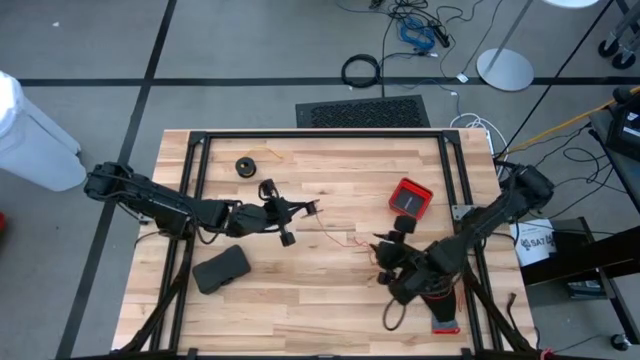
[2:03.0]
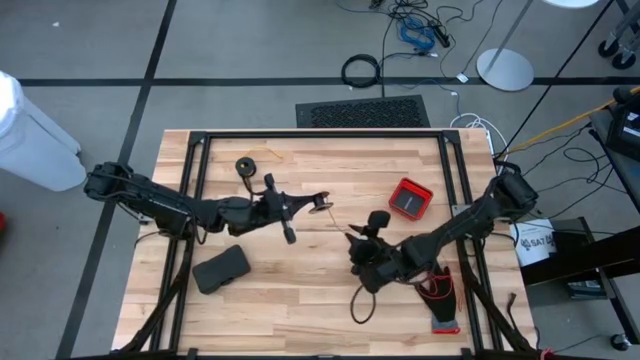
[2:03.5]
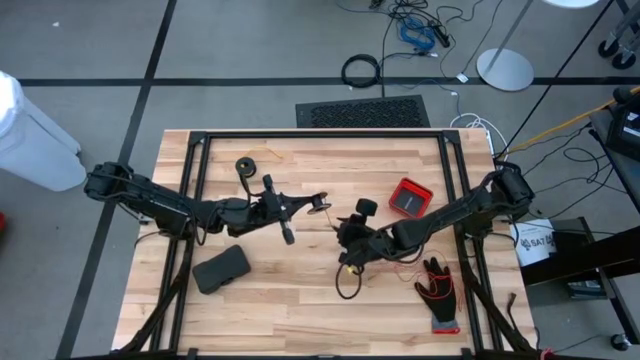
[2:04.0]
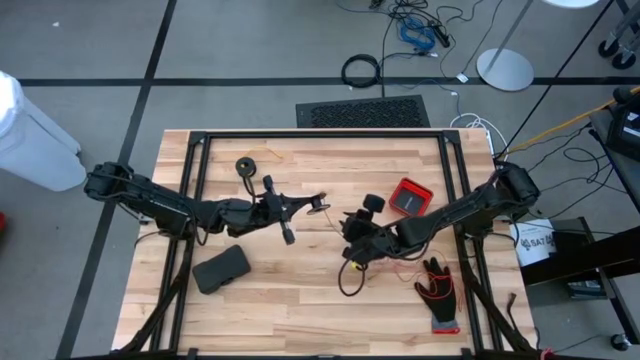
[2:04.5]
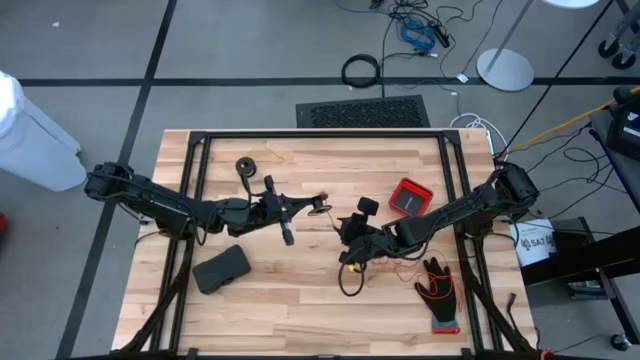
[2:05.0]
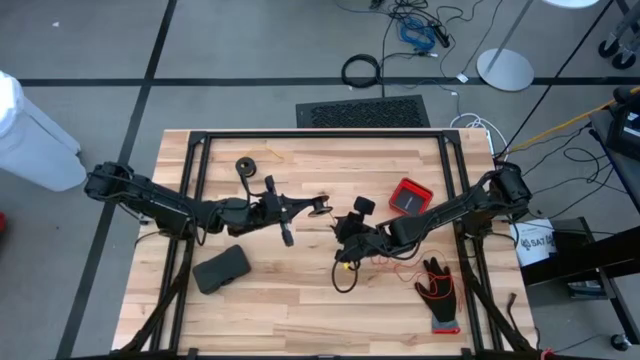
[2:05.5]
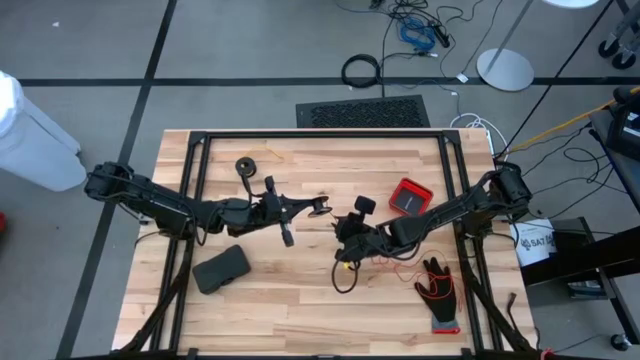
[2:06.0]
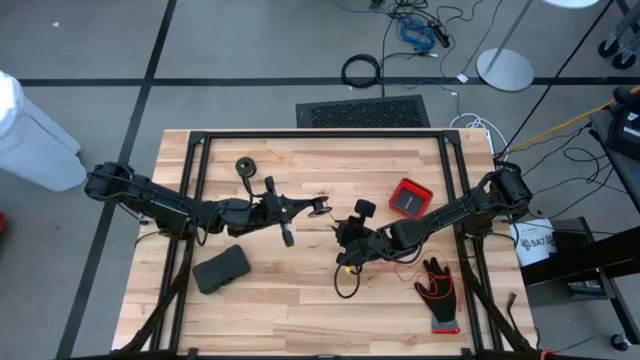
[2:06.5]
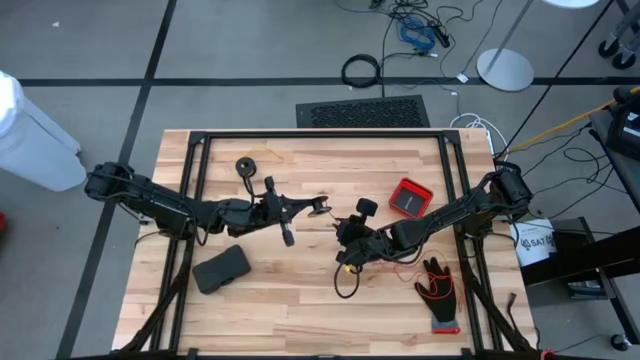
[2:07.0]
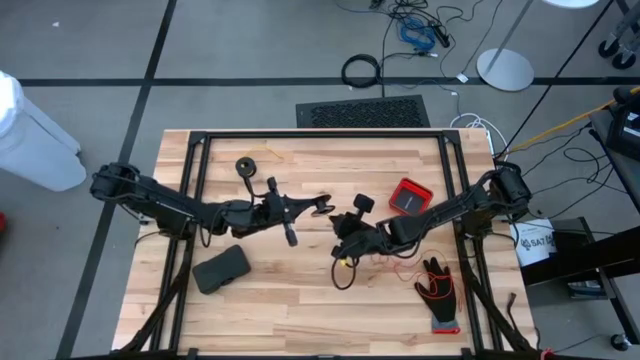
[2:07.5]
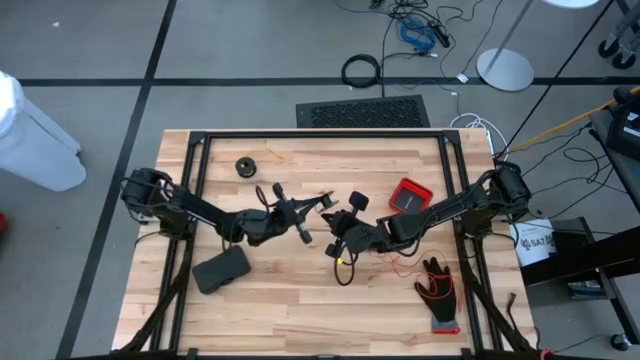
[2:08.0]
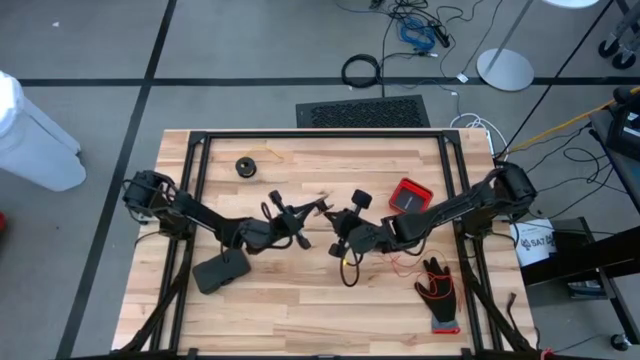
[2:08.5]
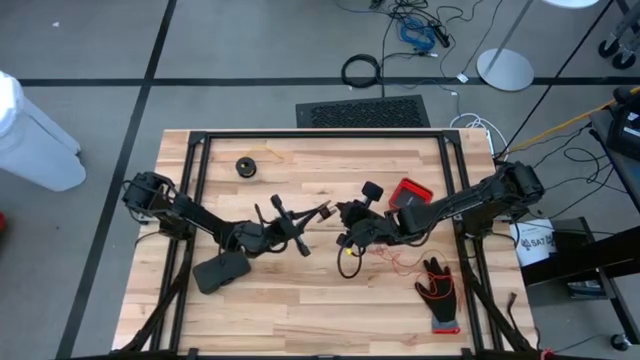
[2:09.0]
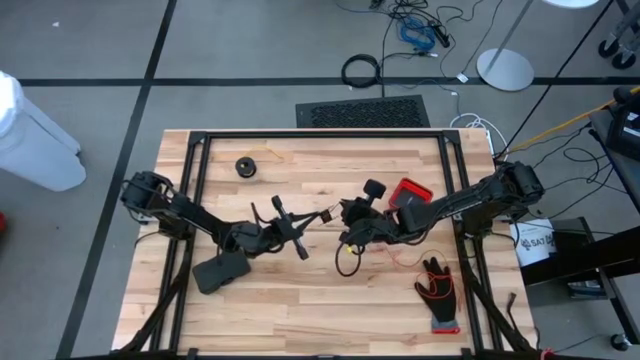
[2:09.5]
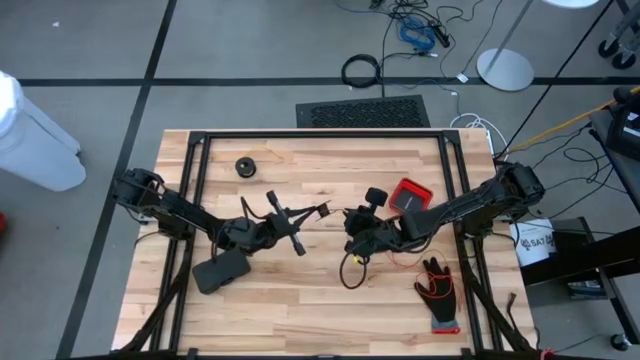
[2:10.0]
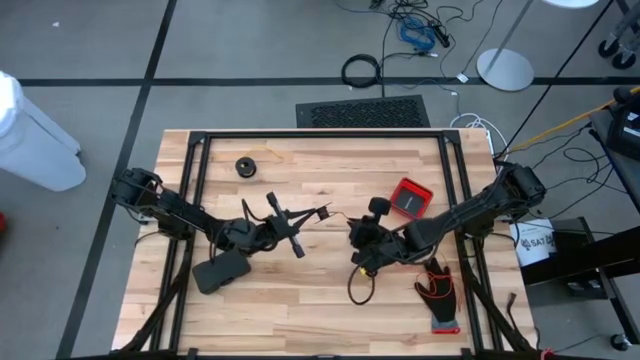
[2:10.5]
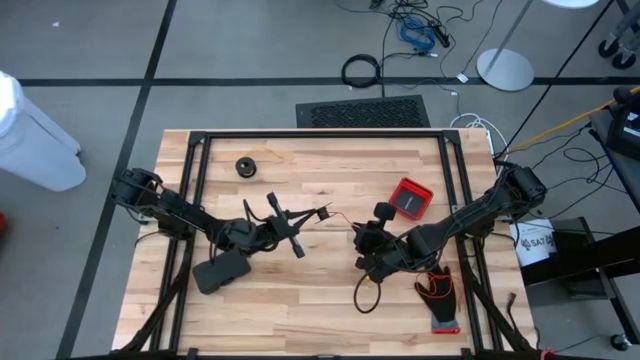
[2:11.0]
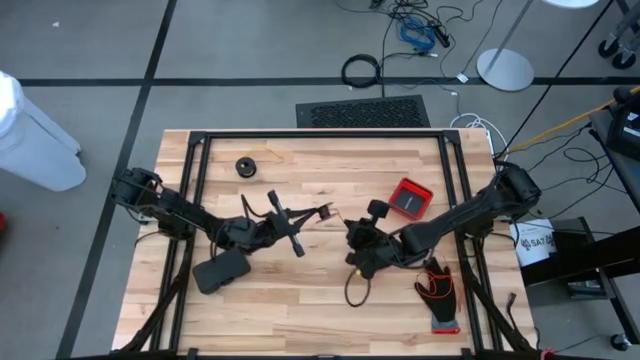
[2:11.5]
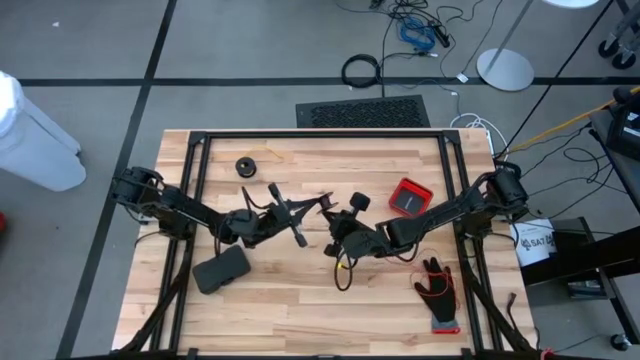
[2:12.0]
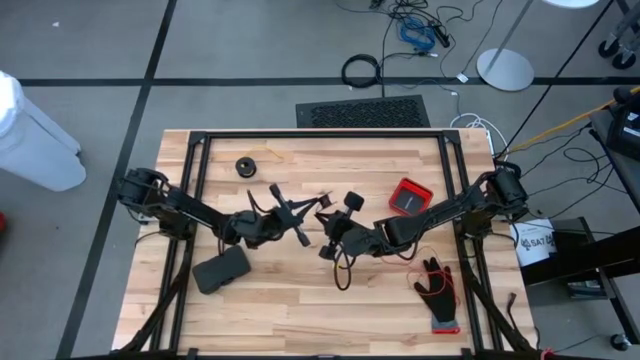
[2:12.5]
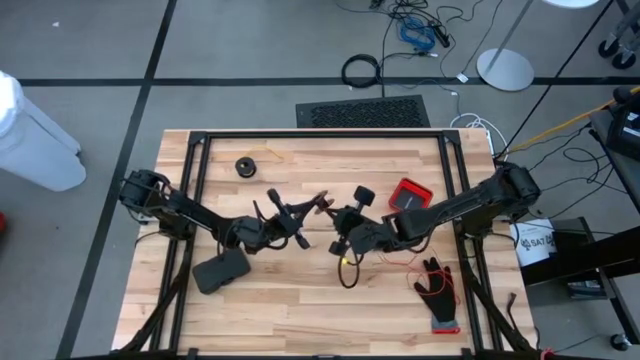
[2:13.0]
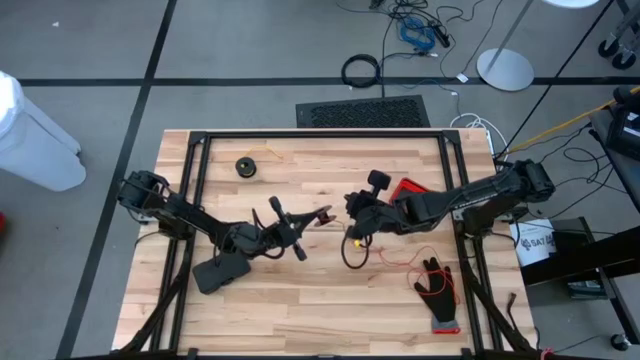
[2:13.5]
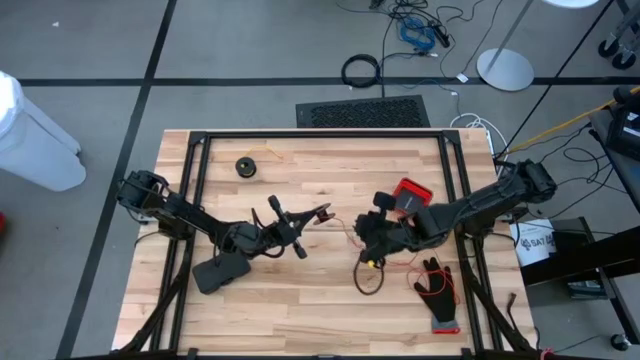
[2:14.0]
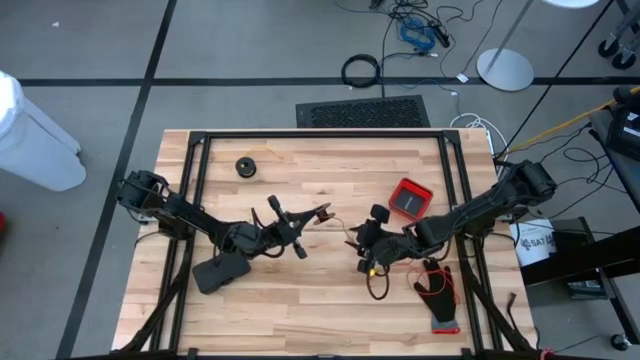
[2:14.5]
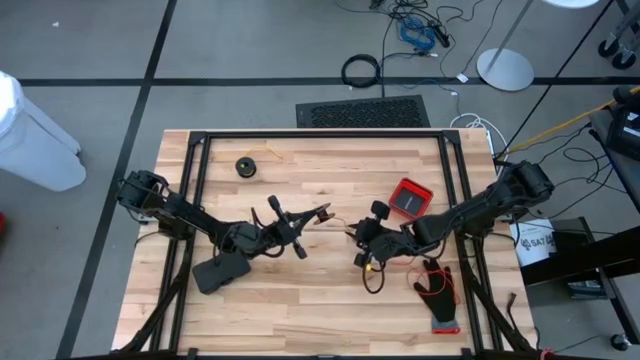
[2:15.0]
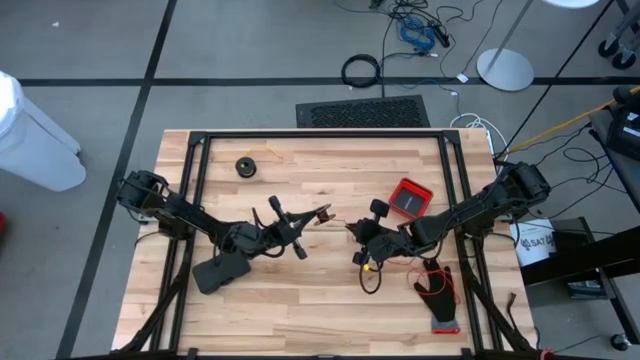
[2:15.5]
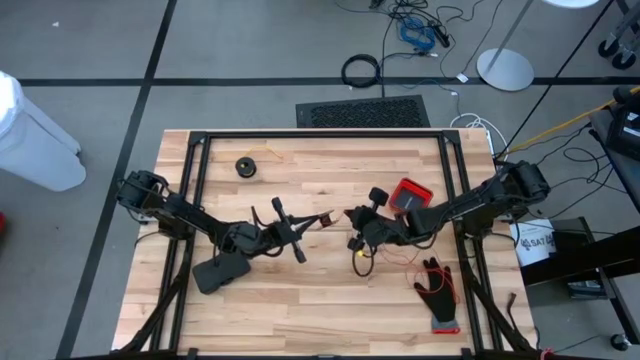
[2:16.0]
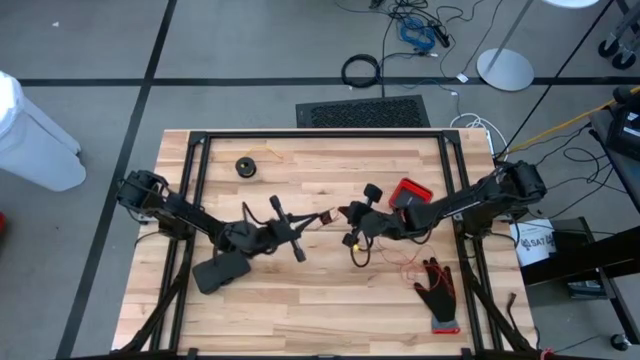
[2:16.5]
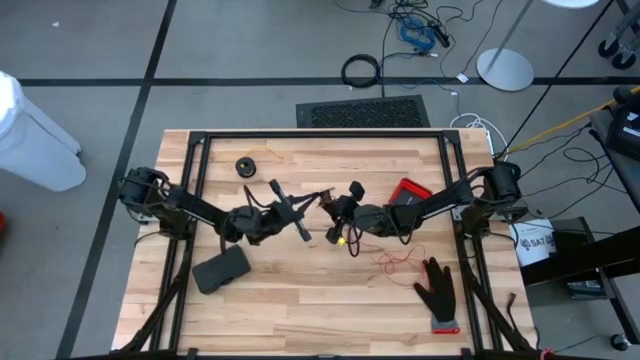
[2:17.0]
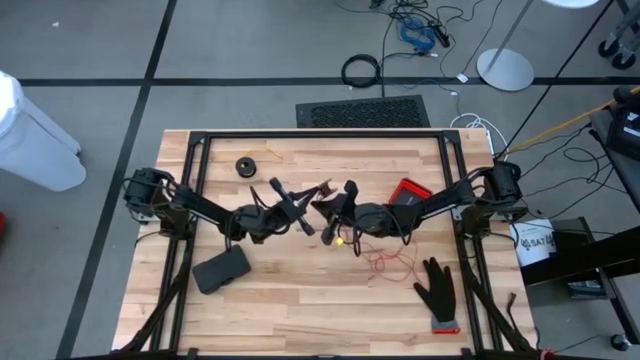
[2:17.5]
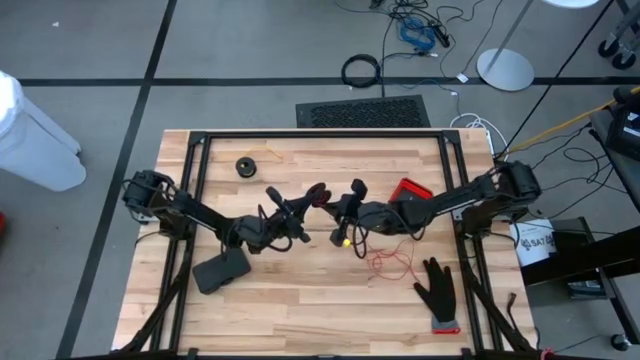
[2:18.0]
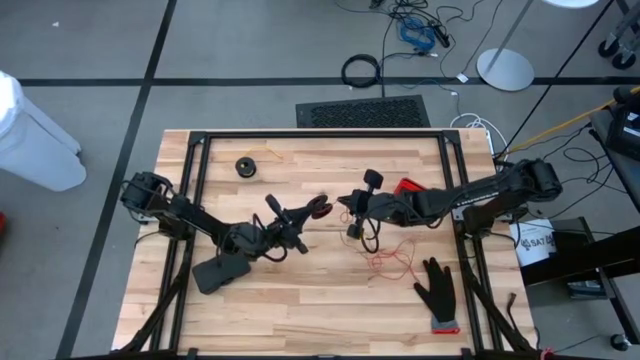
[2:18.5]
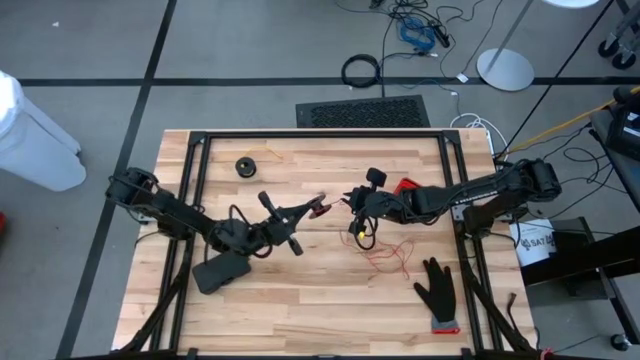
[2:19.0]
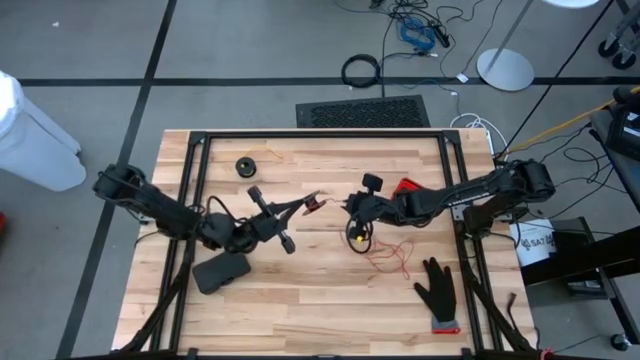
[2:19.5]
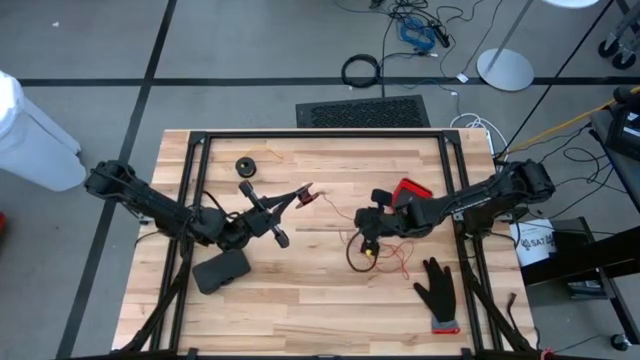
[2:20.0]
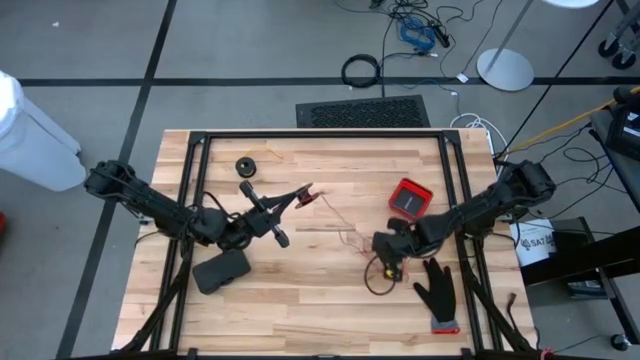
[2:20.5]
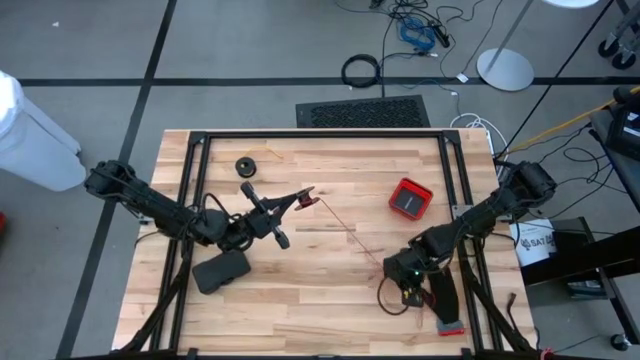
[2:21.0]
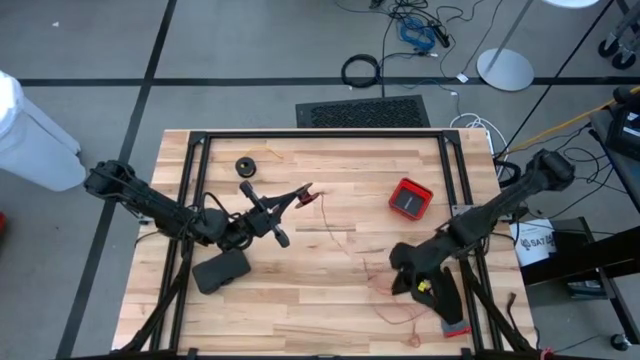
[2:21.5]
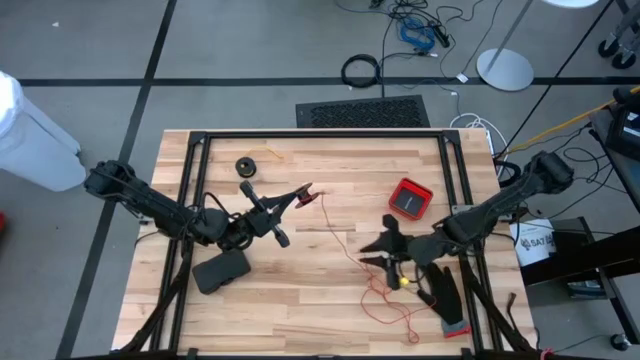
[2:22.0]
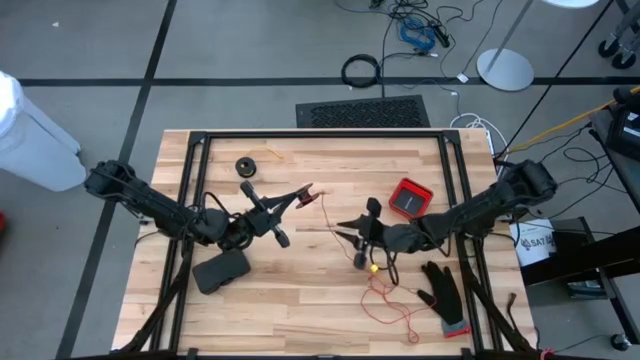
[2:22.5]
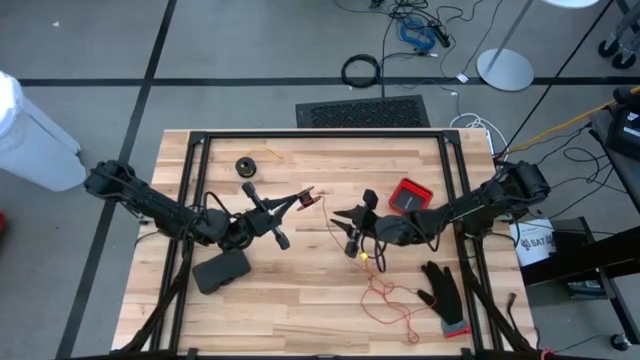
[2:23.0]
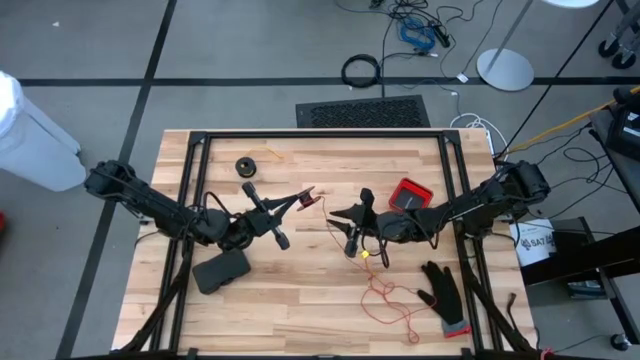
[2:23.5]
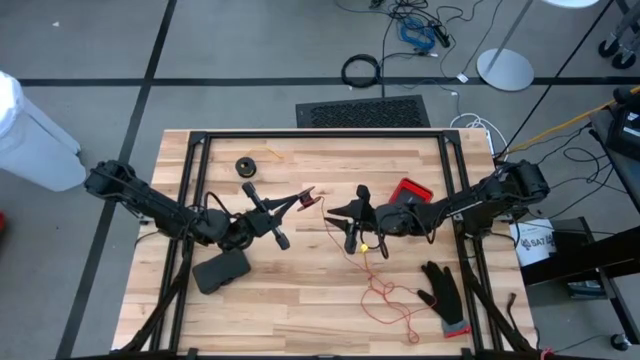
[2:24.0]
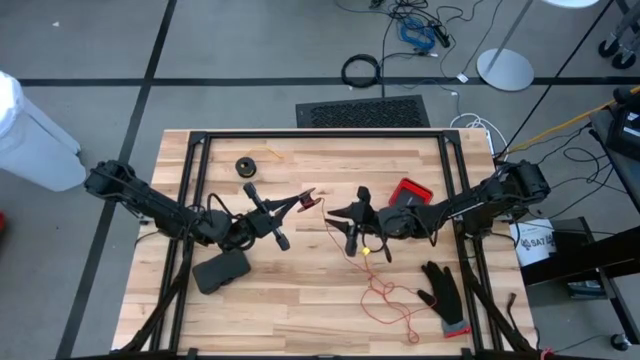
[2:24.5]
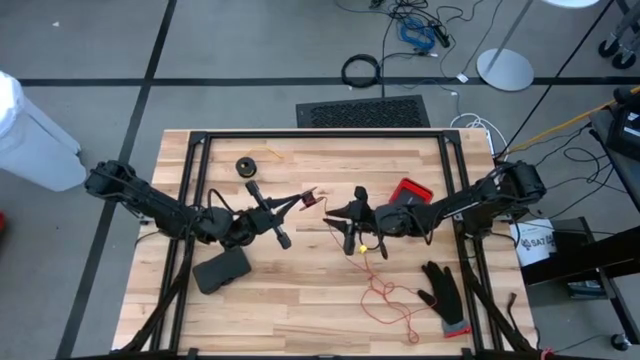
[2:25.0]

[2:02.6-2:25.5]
Task: Coil cords
Coil the red wire onto the black spool
